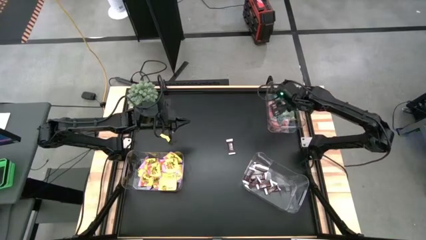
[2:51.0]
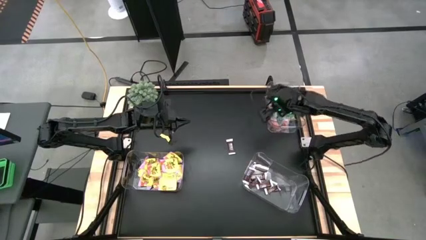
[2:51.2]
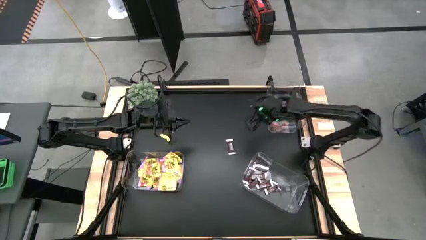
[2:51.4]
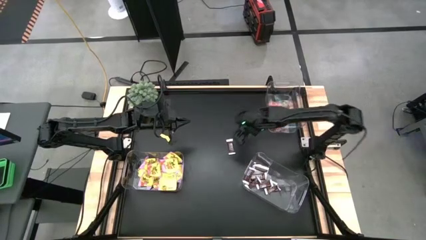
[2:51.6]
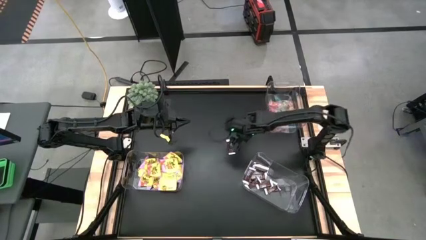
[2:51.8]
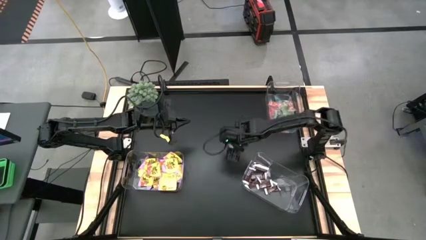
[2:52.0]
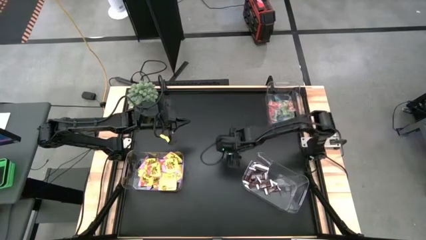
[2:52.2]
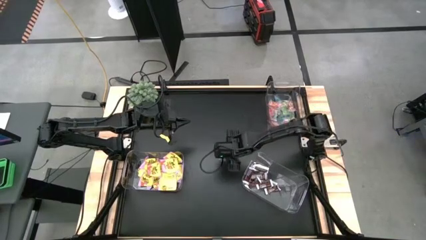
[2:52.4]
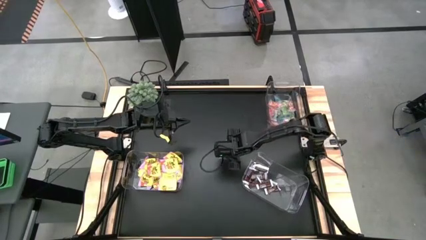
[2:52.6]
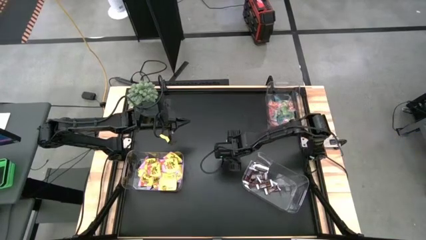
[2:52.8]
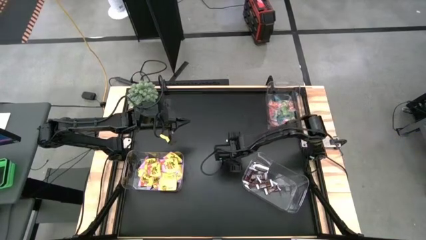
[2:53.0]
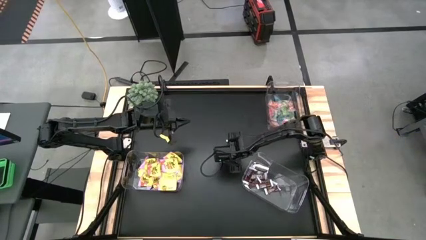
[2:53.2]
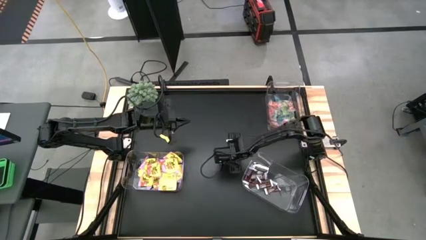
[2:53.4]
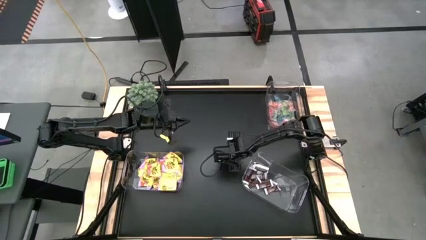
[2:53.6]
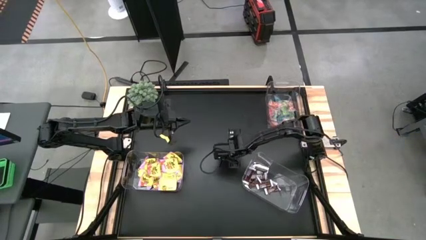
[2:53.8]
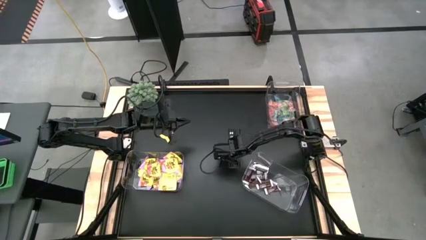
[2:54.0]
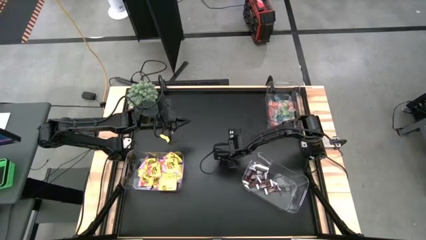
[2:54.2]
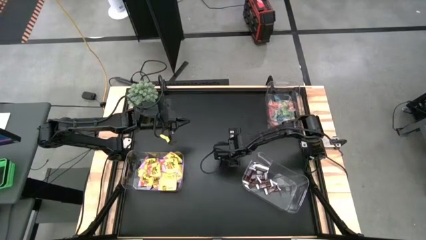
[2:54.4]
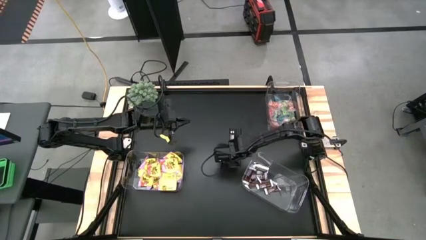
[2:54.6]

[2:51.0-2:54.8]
Task: Sort candy
Put the brown candy in the bottom right transparent container

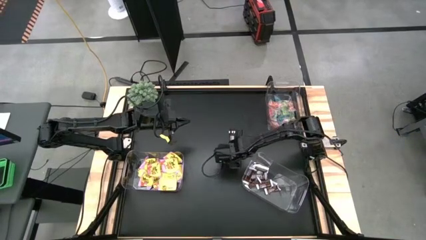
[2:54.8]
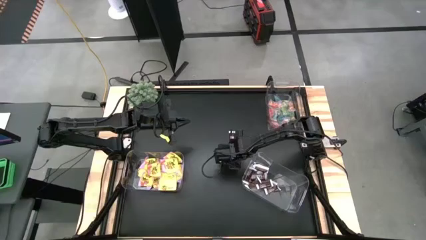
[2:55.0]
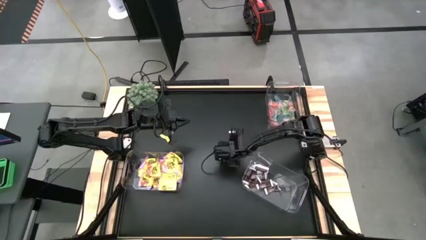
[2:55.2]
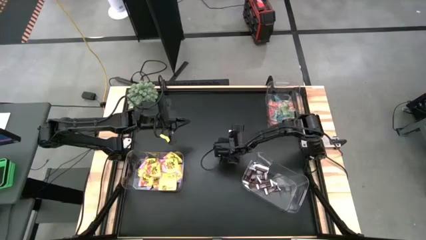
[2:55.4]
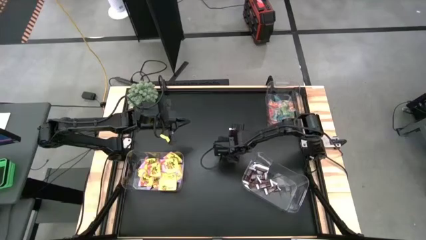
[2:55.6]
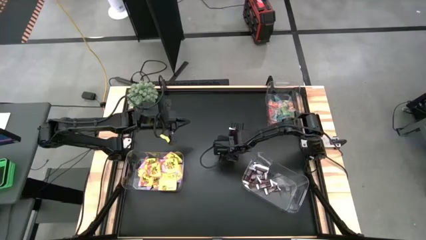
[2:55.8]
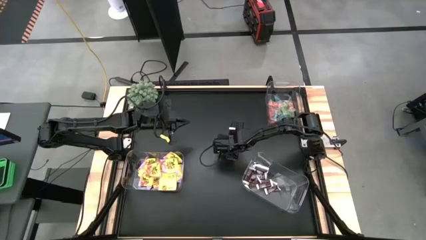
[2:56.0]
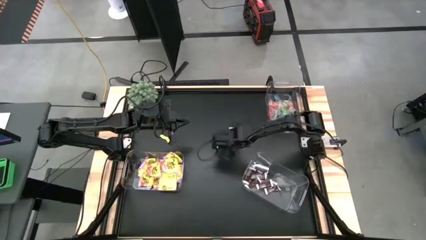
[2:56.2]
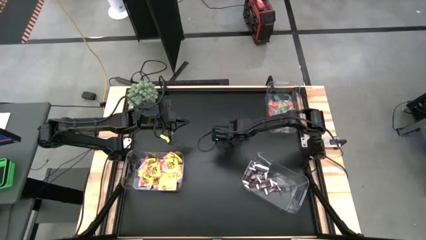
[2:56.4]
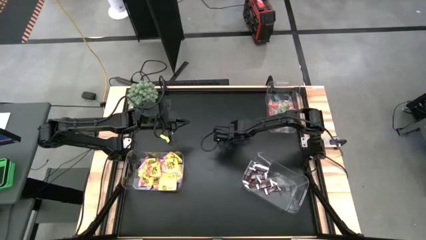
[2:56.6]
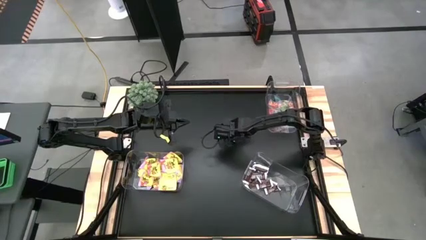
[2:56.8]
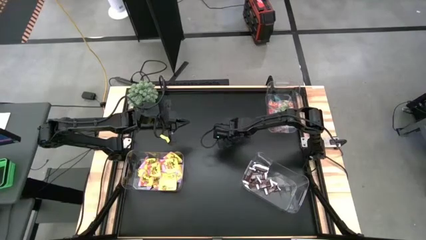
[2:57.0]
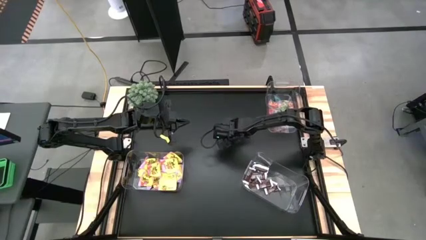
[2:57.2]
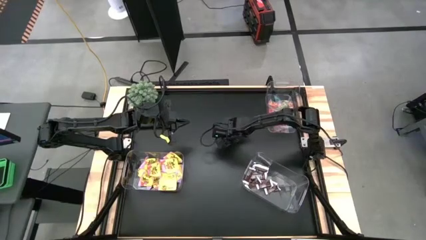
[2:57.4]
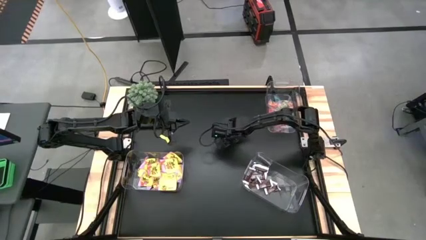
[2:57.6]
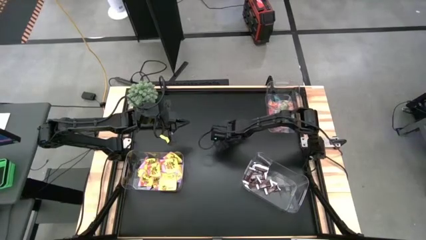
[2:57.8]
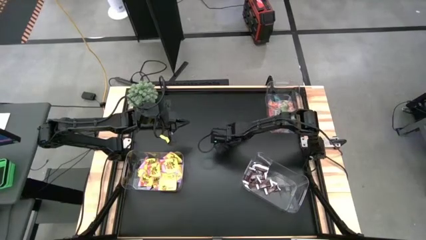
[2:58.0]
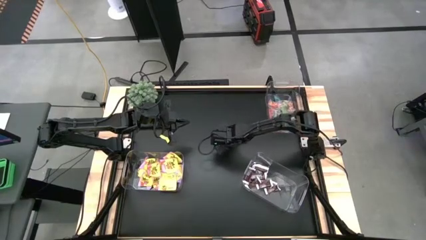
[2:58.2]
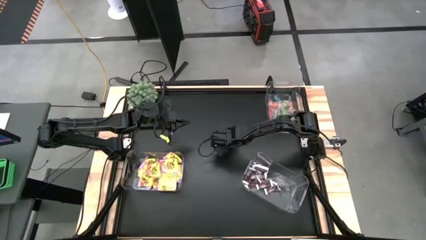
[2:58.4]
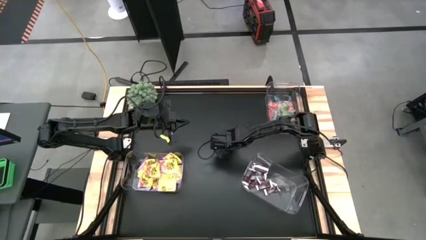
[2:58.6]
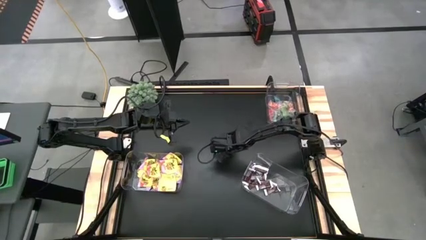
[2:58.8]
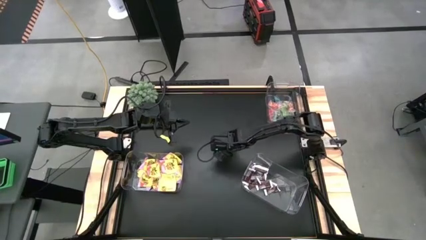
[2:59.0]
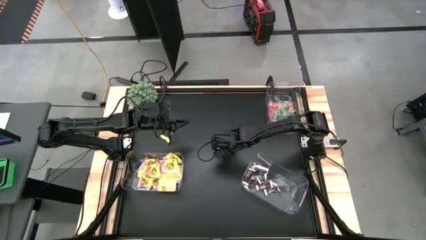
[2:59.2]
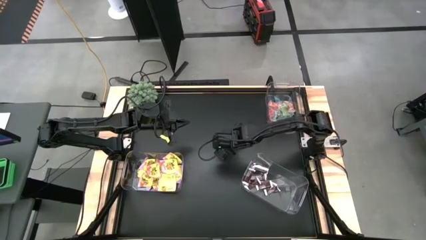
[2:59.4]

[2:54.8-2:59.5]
Put the brown candy in the bottom right transparent container

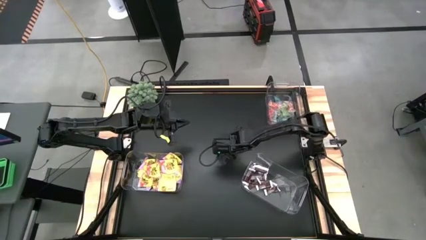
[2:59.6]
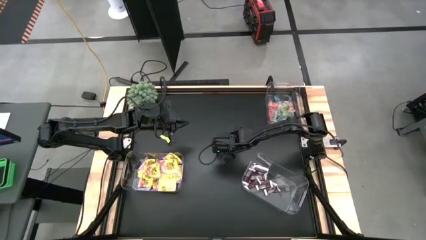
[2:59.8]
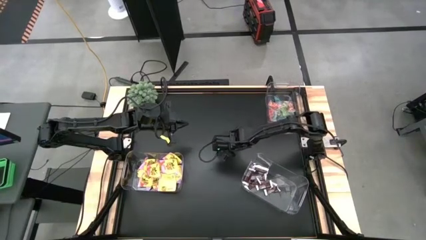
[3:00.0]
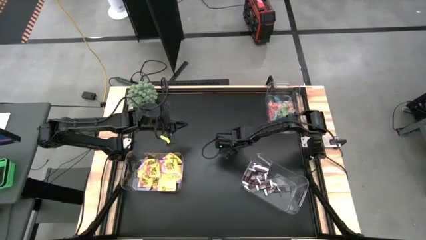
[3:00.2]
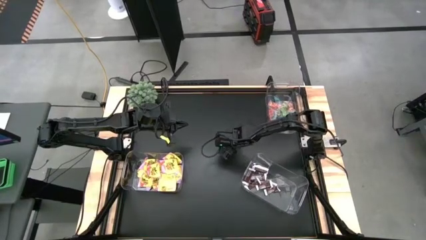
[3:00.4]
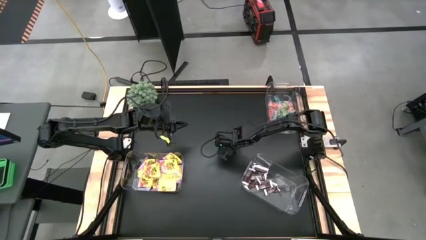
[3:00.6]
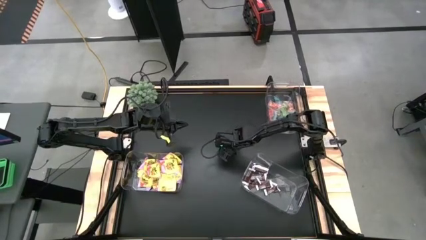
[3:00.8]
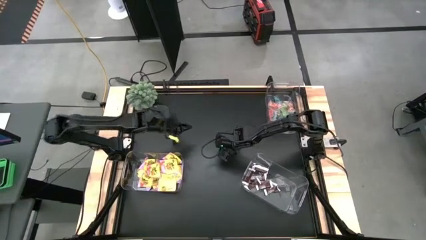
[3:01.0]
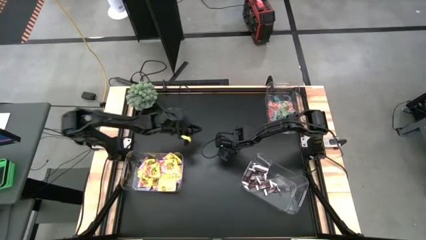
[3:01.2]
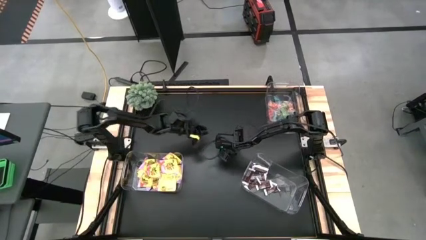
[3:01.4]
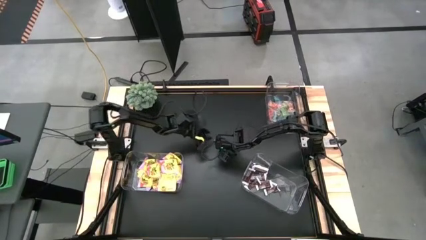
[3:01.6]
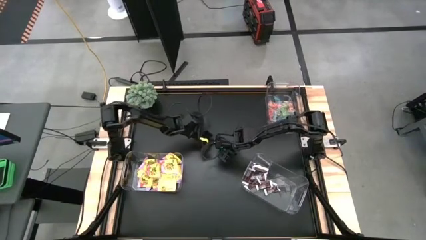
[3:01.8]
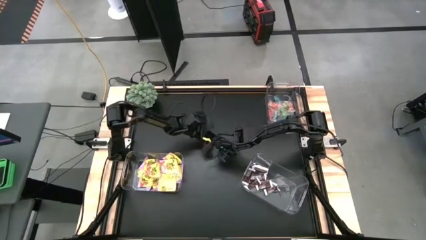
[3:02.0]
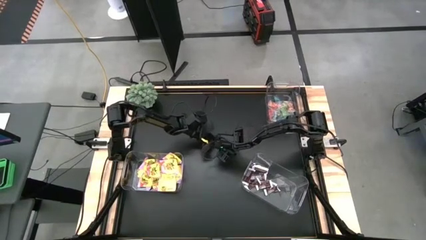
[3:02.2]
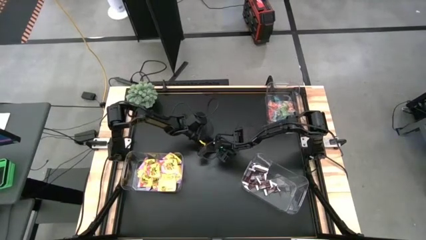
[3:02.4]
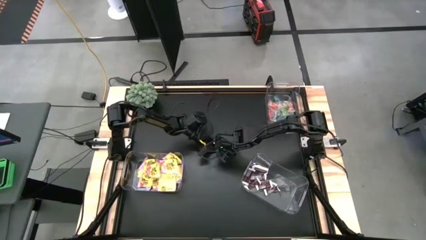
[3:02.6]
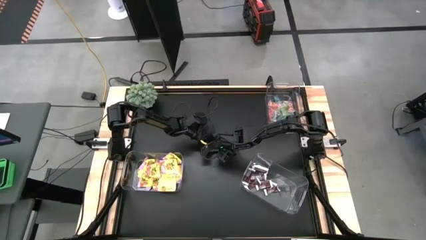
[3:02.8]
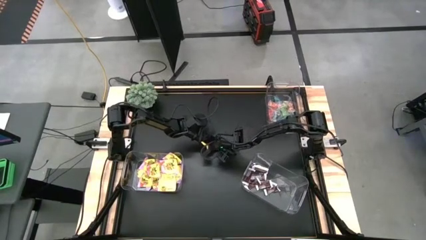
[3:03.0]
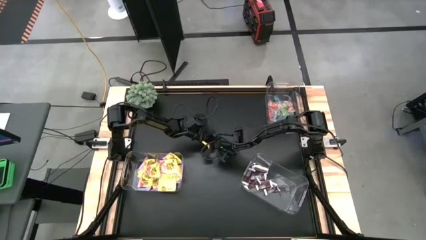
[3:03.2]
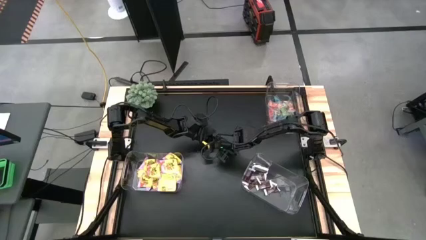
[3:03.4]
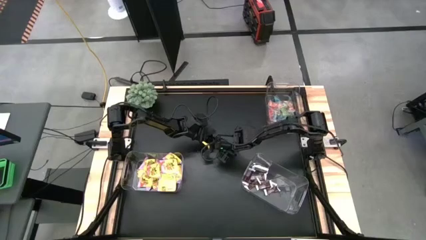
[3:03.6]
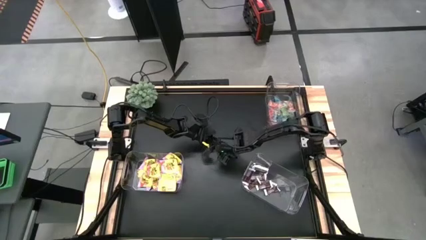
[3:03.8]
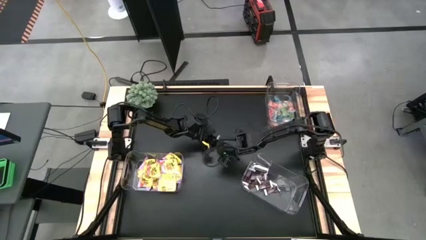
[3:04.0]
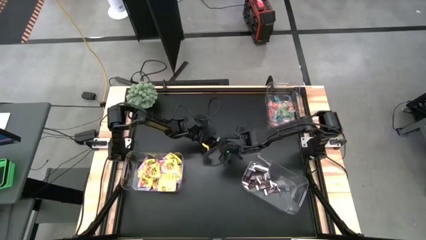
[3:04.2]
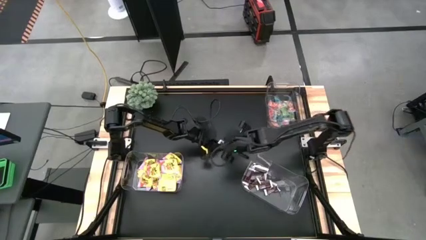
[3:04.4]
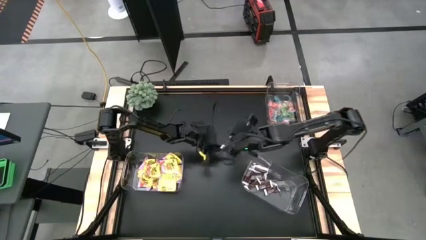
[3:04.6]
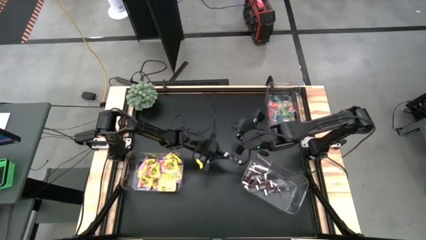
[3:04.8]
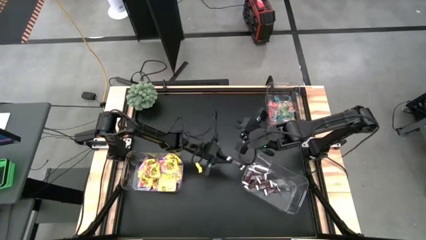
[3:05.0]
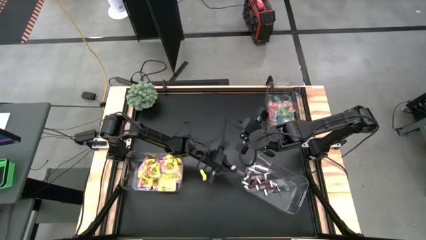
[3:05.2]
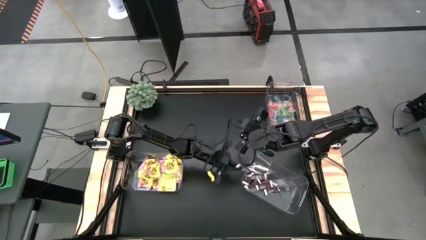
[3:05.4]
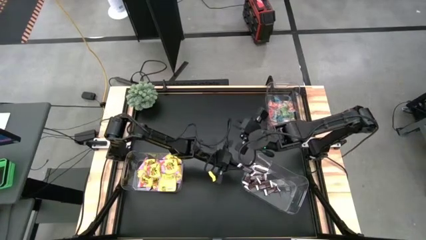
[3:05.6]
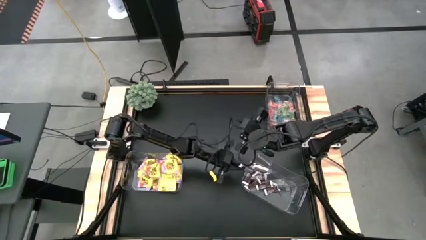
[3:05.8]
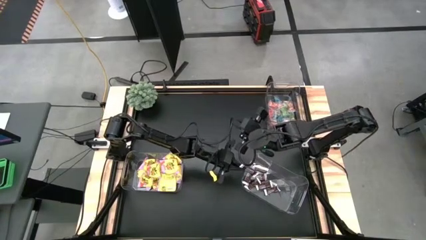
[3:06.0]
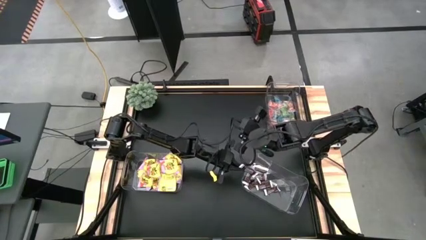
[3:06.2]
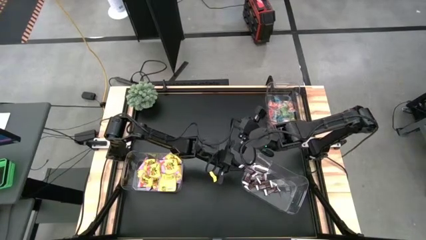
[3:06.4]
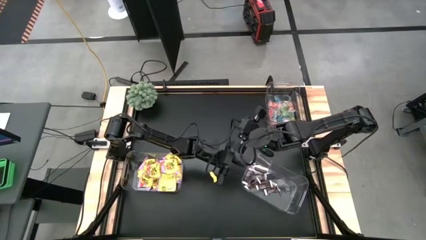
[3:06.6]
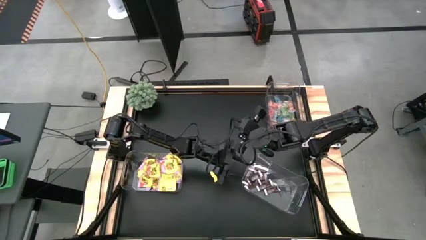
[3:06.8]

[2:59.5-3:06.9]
Put the brown candy in the bottom right transparent container
